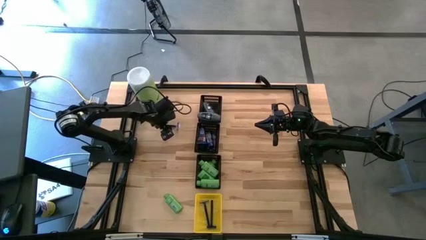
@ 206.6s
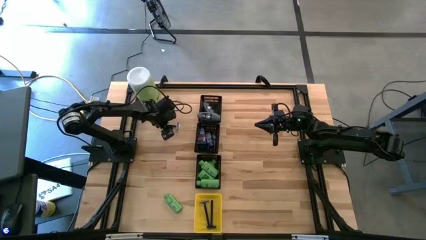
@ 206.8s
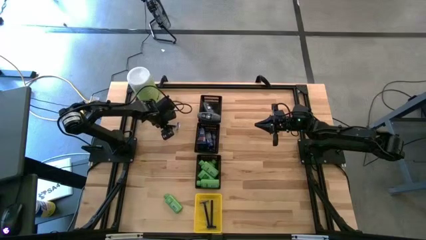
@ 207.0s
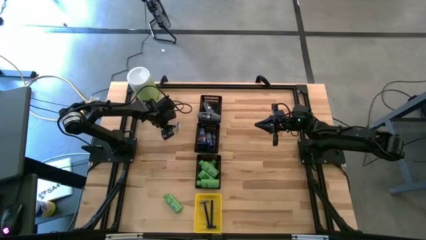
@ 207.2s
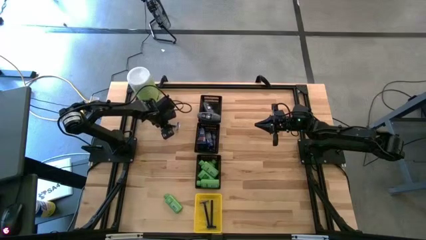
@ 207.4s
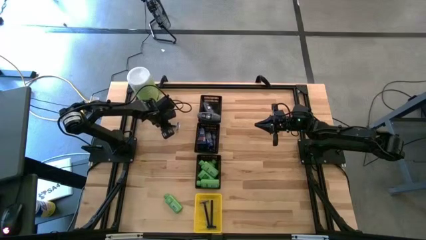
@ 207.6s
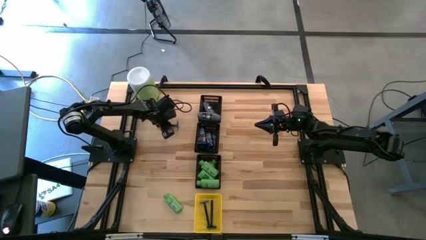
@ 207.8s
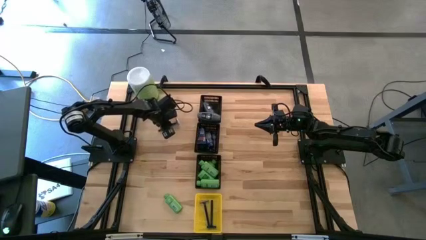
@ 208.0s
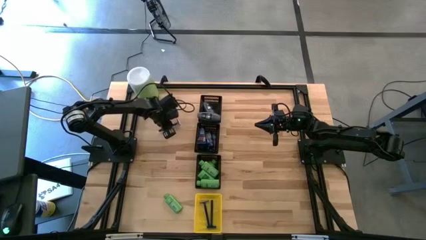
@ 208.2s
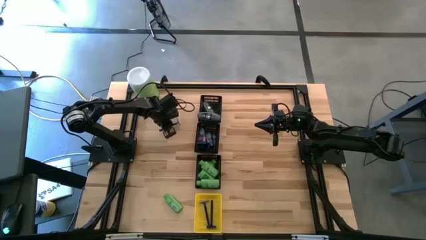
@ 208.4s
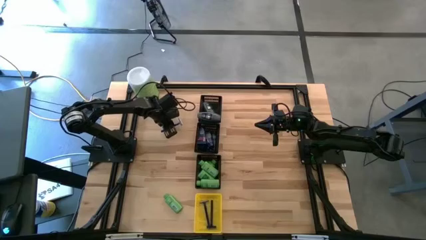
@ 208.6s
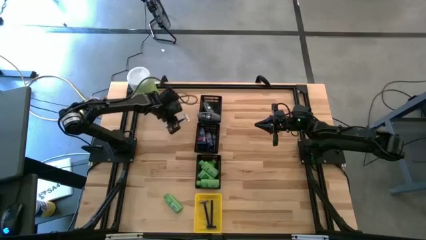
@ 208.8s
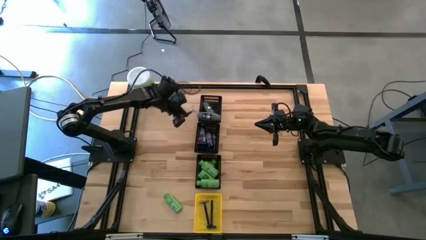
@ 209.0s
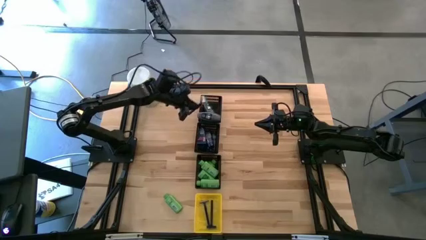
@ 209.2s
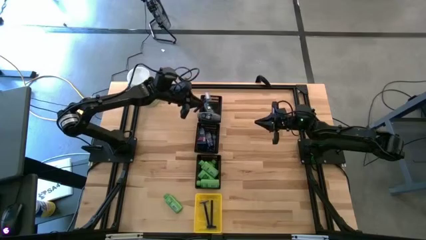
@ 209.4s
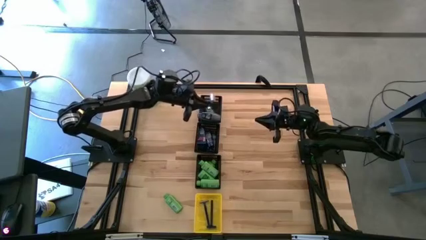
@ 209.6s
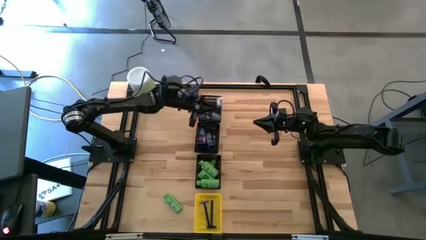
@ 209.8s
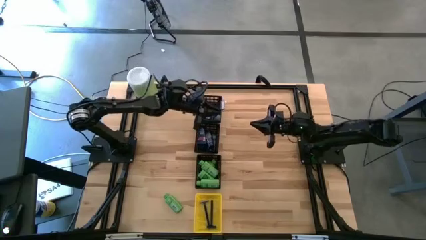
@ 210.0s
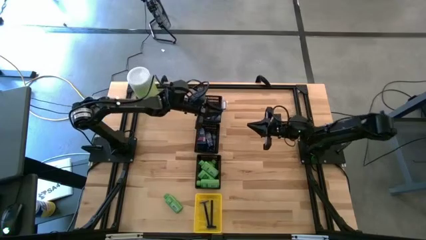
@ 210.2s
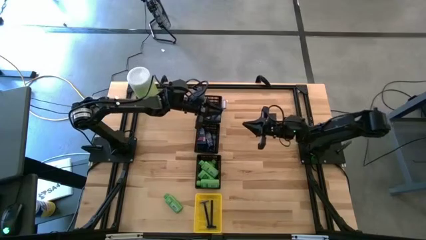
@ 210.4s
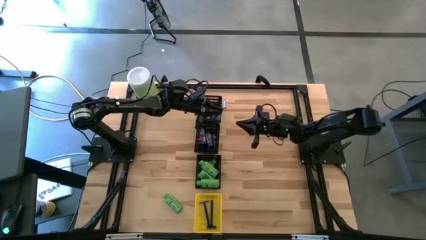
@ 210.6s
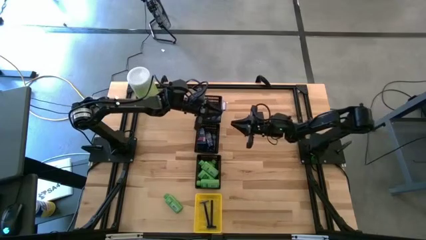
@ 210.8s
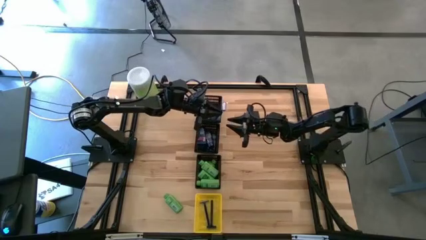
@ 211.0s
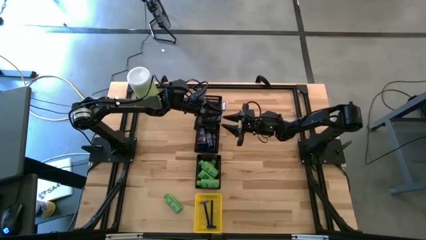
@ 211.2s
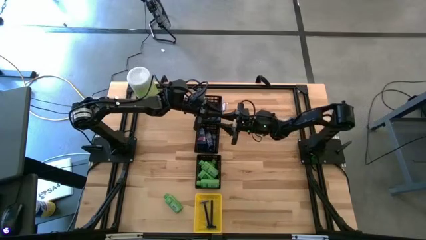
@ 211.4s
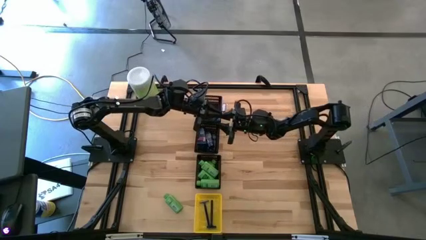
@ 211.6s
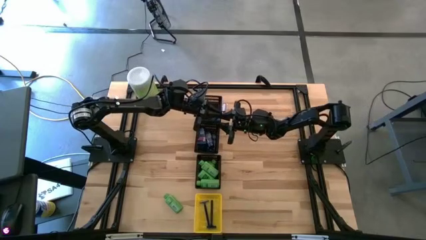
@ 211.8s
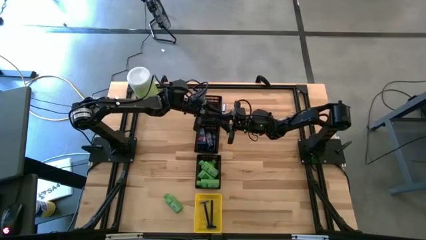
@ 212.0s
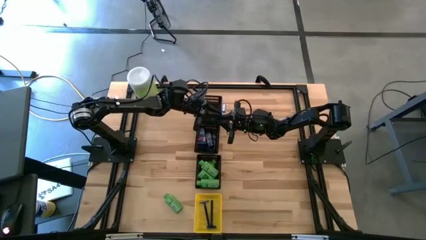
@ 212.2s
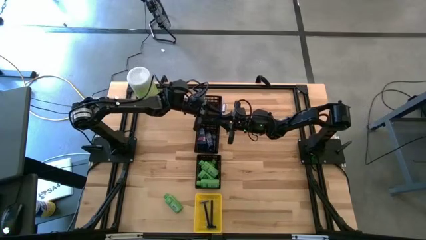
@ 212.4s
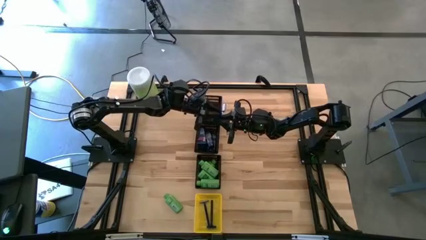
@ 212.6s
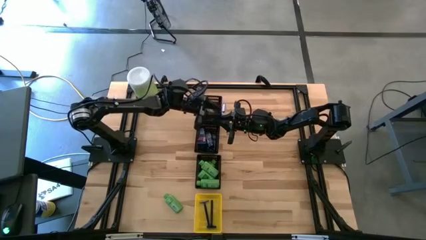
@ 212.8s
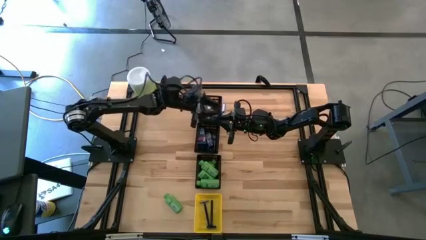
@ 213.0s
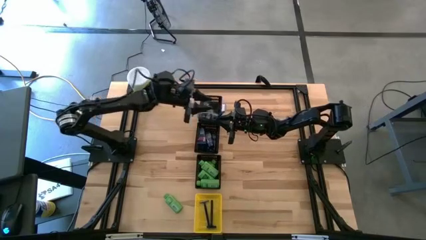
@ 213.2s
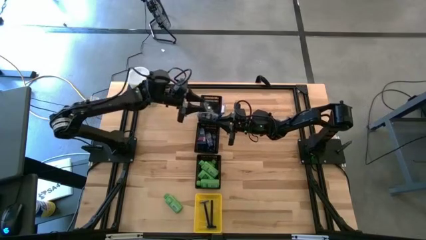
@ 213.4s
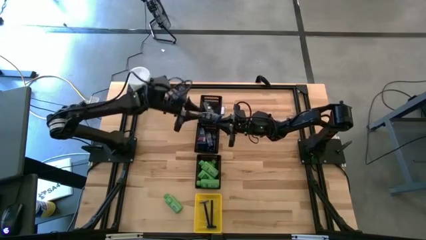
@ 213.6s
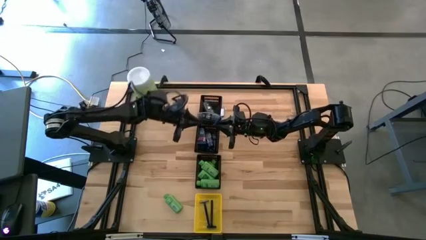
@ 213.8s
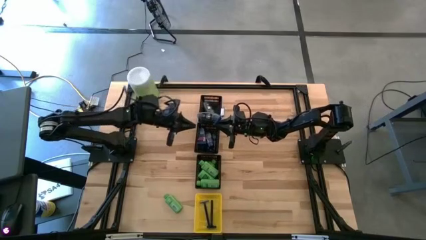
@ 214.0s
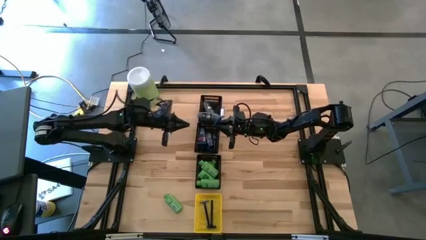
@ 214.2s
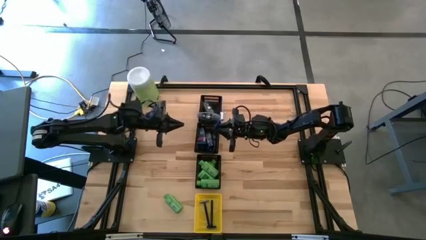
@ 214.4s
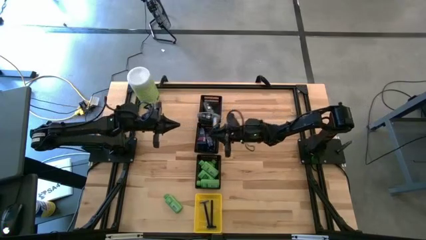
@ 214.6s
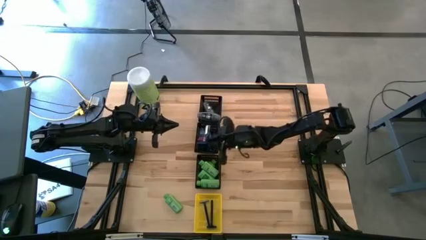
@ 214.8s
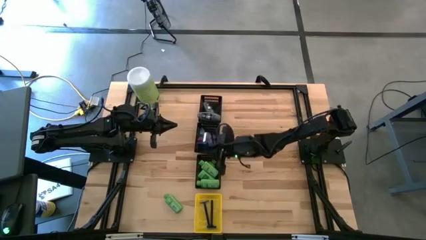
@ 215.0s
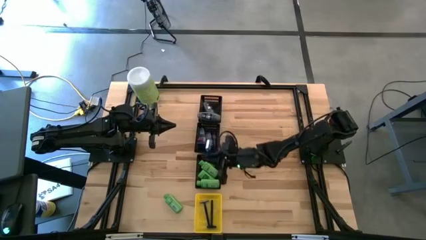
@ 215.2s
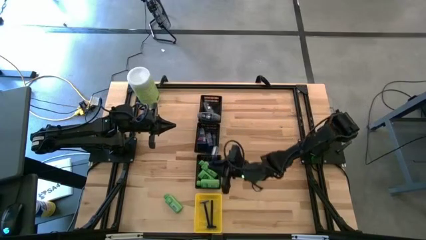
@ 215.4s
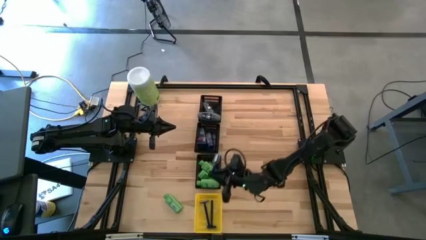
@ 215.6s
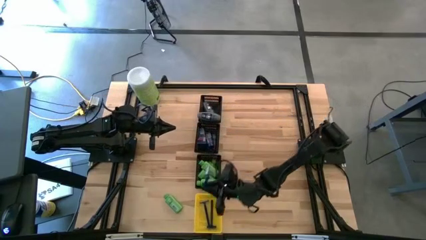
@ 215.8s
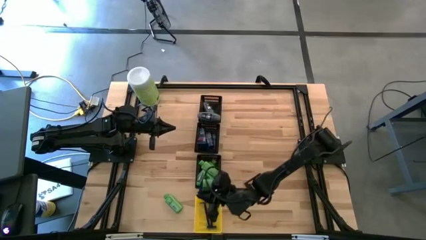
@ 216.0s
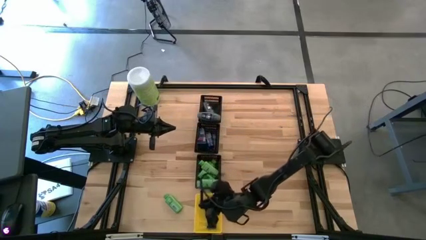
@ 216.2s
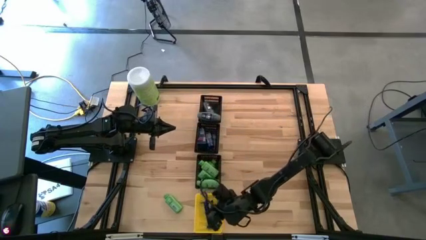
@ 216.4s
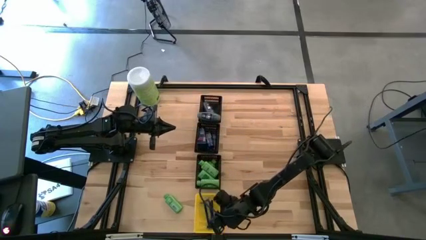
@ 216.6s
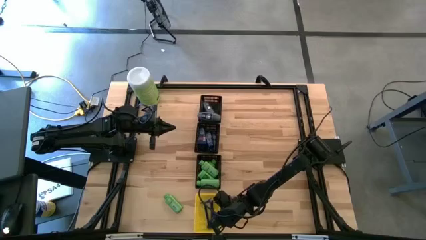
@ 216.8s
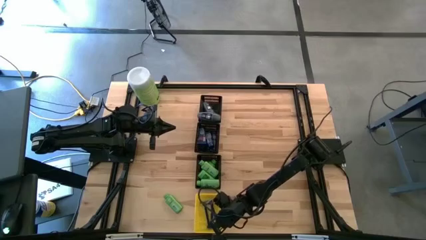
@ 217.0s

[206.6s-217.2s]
Task: Pick & Place Travel size toiletries
Put the blue razor into the yellow bin

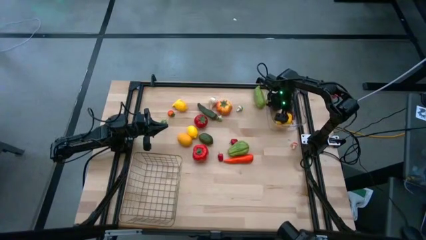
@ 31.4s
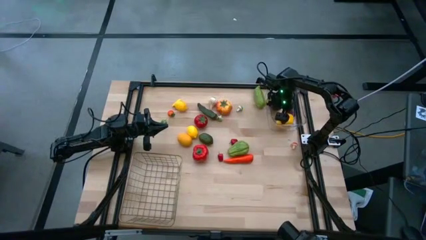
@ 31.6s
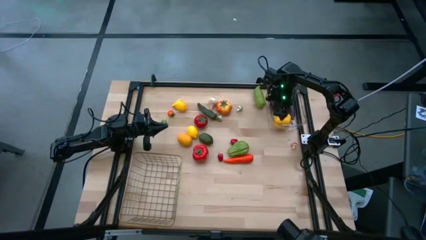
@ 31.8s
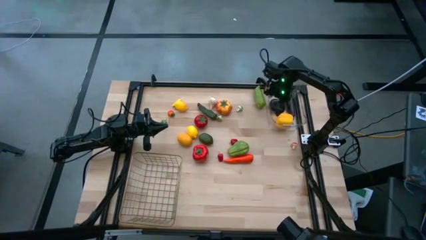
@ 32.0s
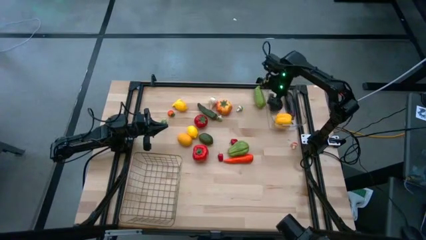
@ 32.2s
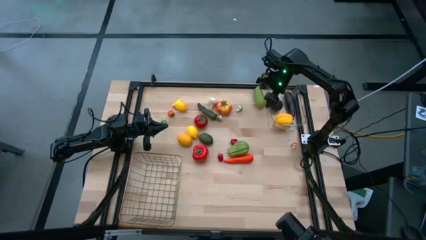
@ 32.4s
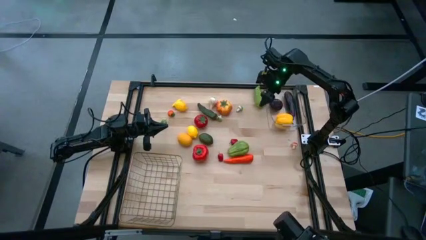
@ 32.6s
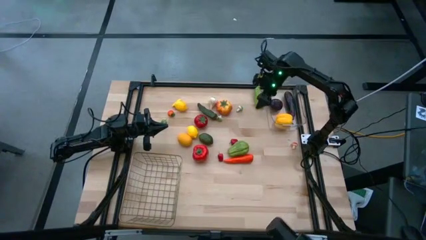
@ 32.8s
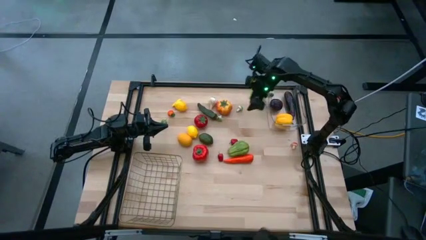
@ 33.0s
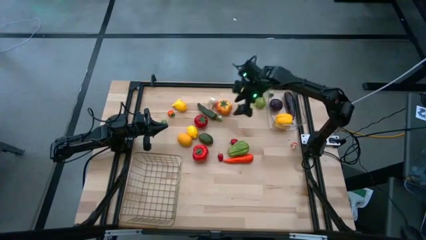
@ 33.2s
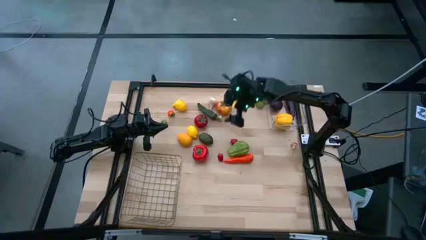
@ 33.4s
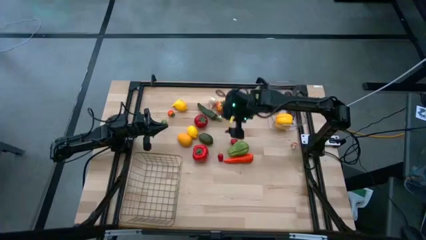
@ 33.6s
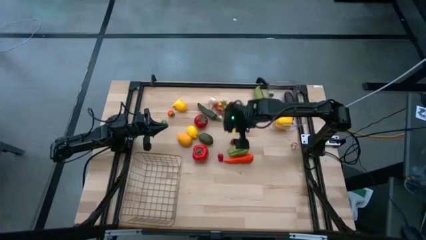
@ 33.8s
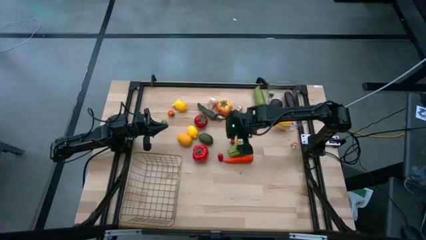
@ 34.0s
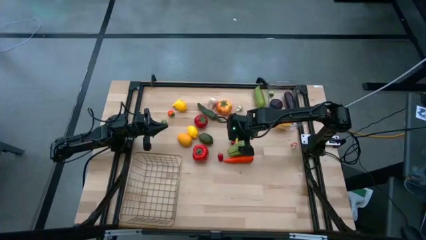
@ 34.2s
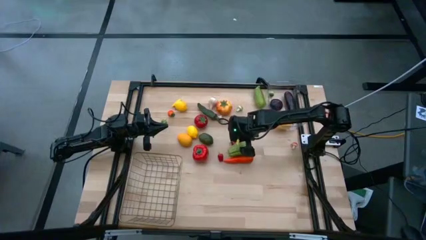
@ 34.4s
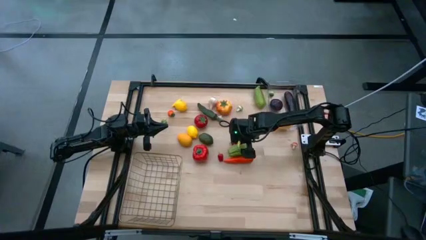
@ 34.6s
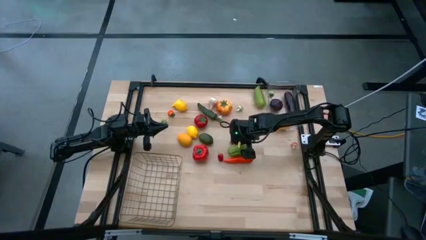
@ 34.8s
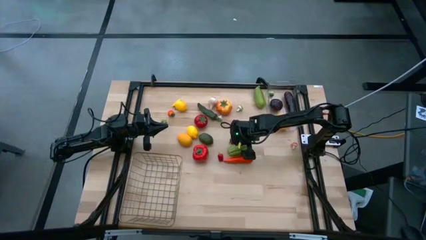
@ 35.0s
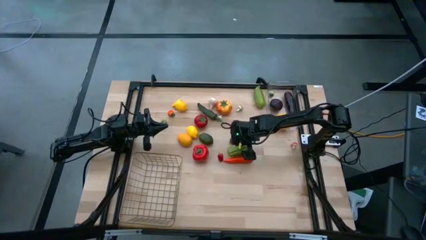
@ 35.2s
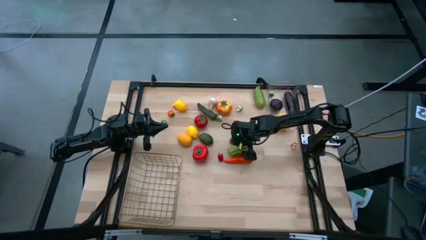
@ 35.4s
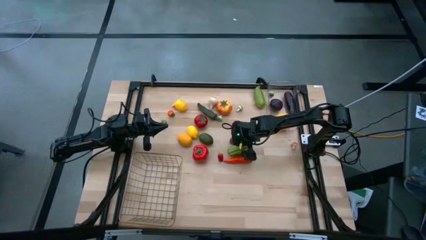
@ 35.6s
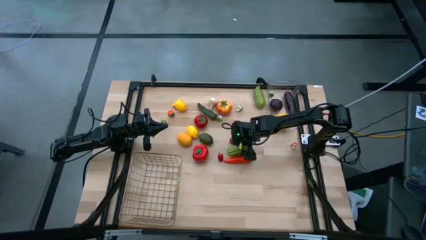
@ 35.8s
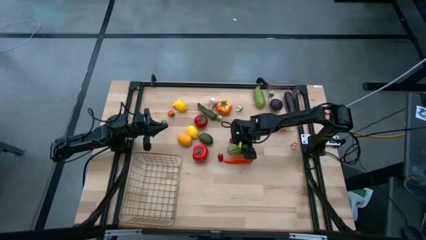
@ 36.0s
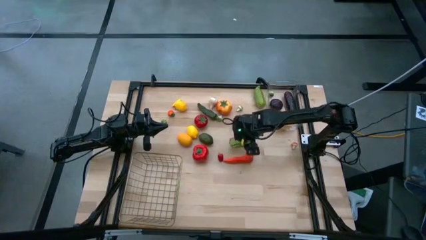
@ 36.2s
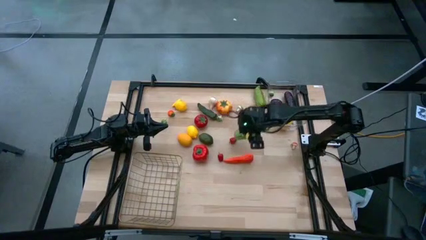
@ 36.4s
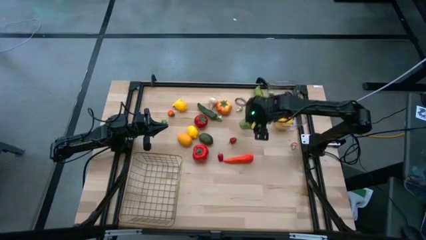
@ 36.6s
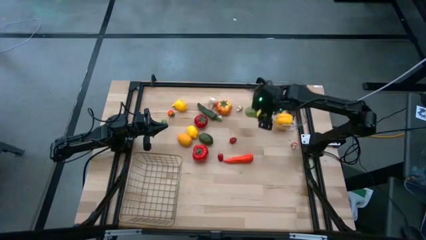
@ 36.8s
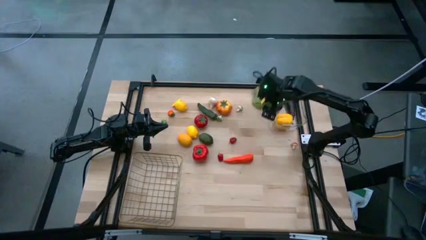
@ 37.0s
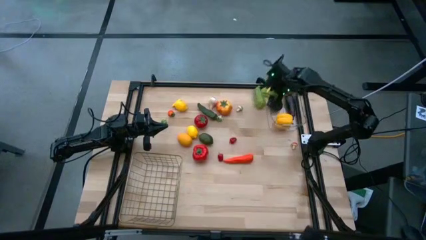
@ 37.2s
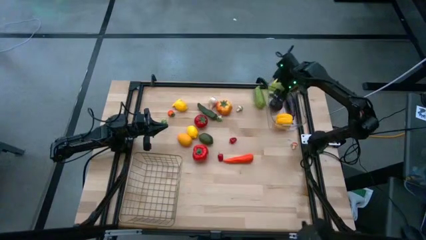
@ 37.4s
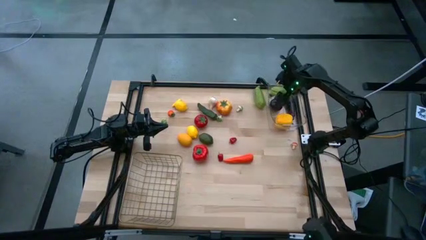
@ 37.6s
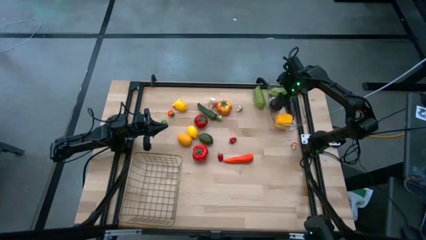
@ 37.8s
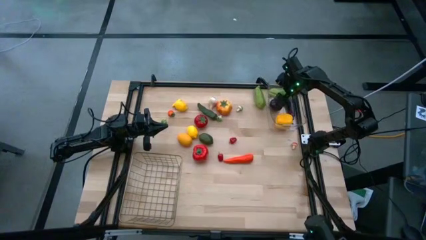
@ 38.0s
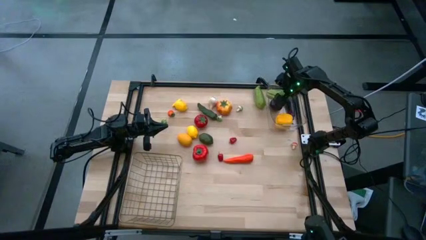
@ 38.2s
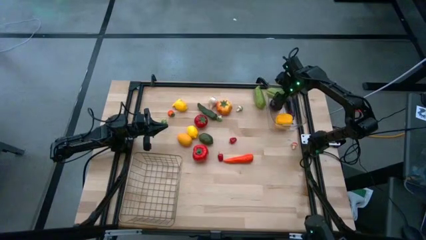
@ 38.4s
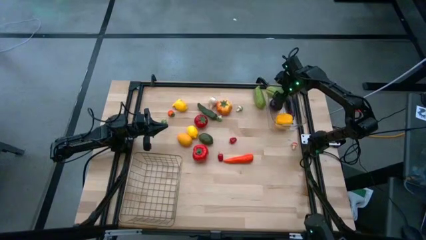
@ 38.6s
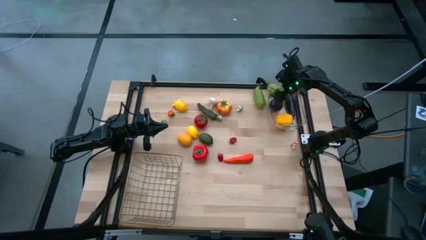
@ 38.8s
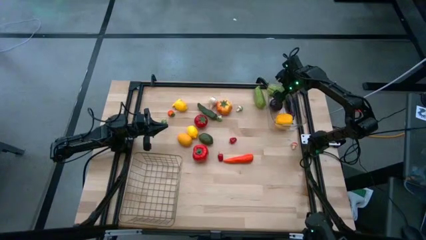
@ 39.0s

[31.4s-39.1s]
Task: Sort produce into baskets
Put the green chayote into the transparent bin
